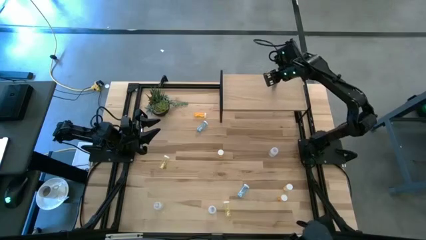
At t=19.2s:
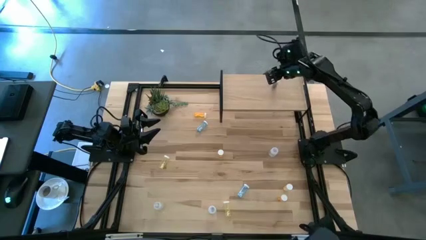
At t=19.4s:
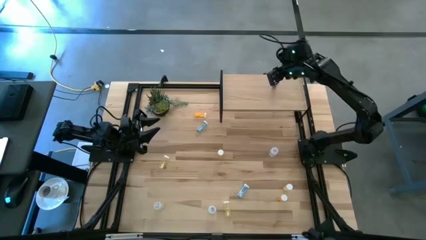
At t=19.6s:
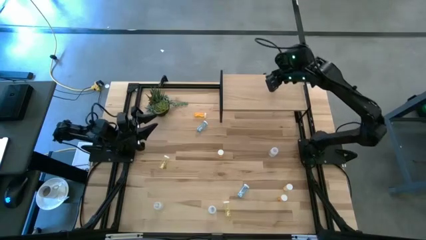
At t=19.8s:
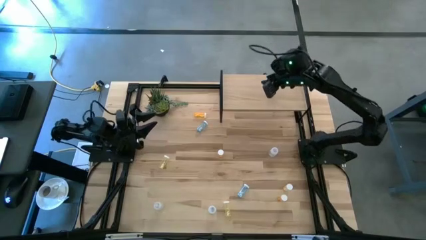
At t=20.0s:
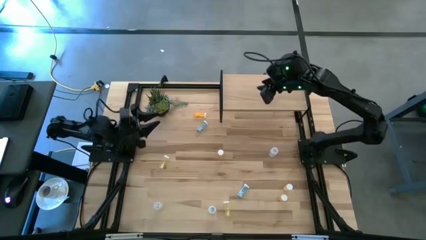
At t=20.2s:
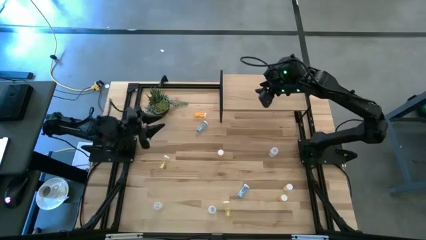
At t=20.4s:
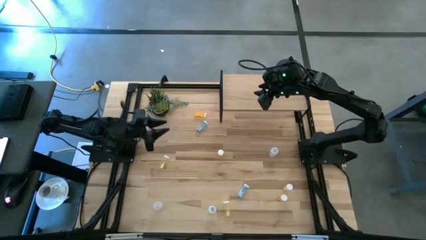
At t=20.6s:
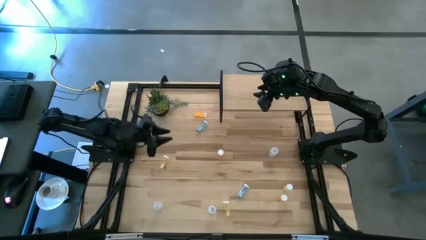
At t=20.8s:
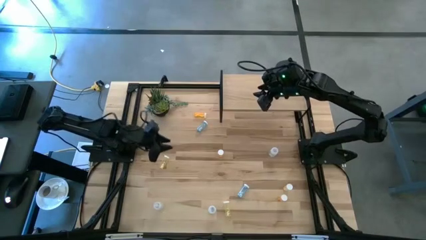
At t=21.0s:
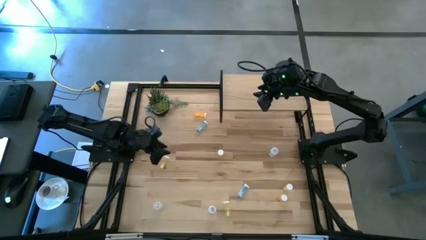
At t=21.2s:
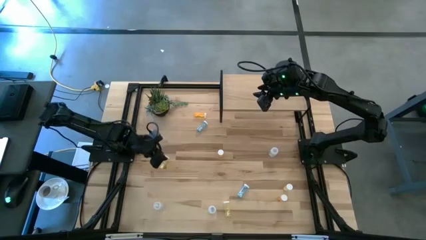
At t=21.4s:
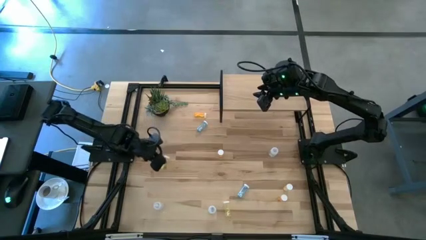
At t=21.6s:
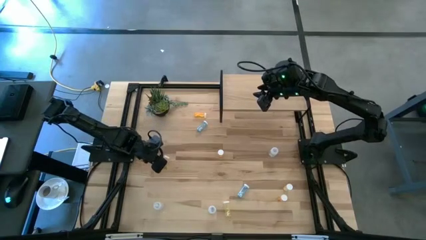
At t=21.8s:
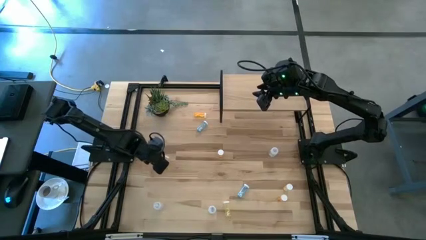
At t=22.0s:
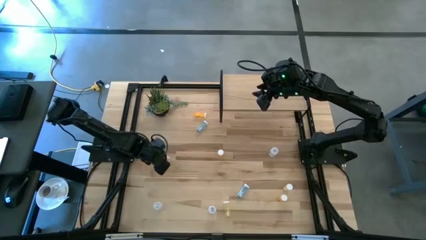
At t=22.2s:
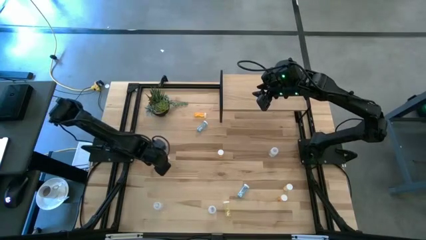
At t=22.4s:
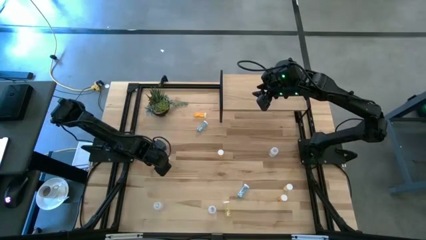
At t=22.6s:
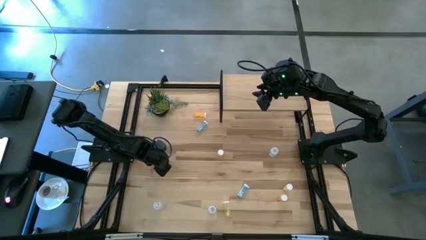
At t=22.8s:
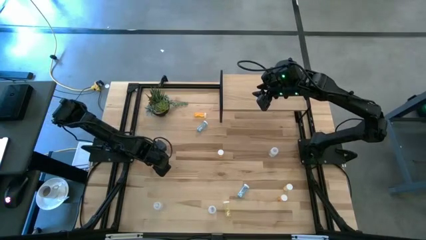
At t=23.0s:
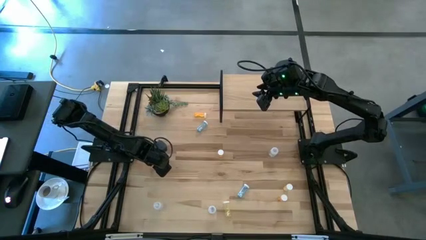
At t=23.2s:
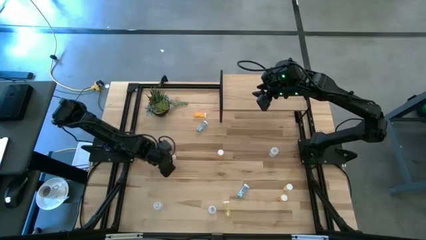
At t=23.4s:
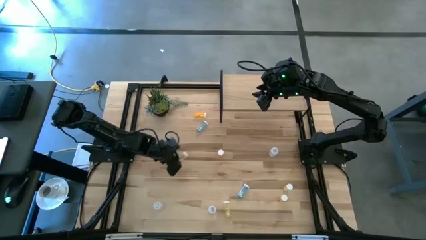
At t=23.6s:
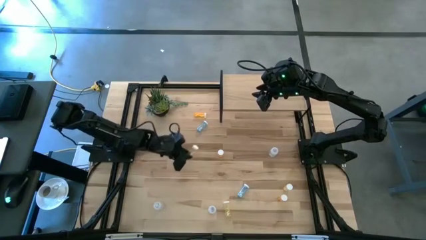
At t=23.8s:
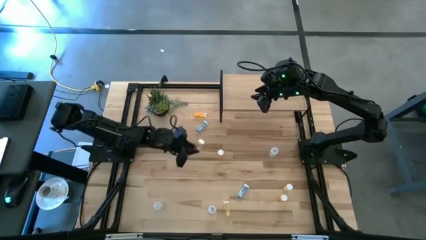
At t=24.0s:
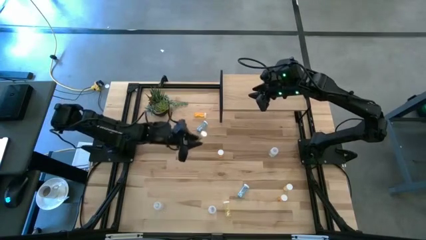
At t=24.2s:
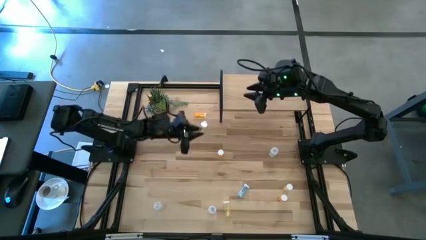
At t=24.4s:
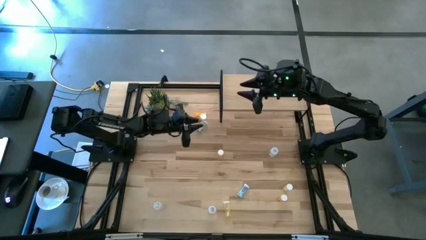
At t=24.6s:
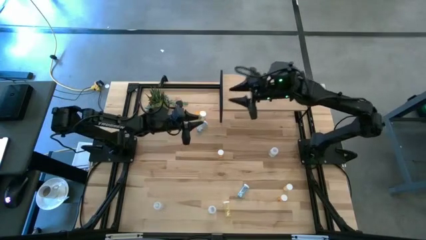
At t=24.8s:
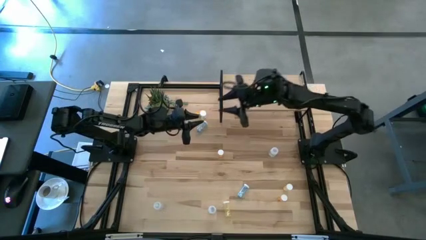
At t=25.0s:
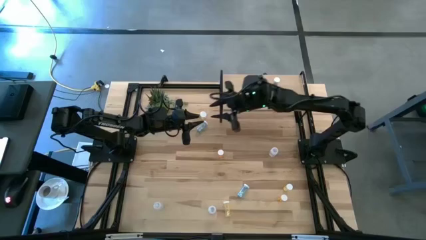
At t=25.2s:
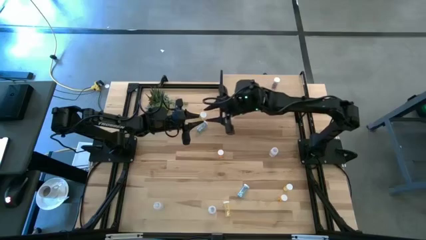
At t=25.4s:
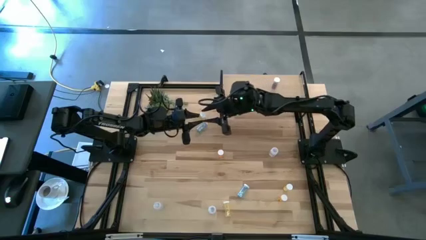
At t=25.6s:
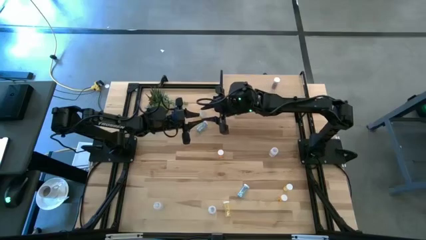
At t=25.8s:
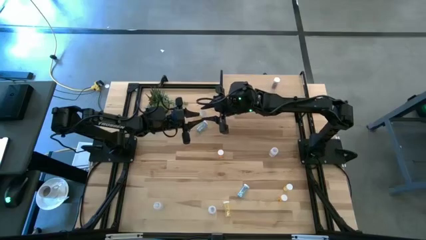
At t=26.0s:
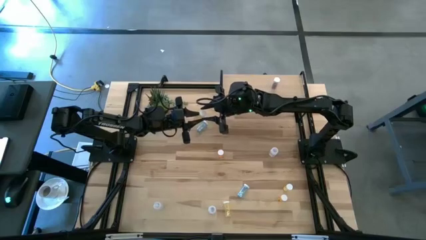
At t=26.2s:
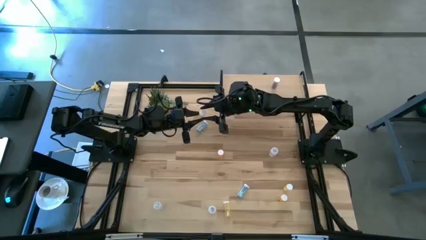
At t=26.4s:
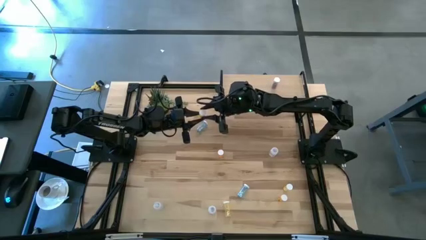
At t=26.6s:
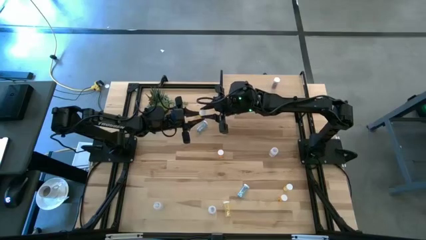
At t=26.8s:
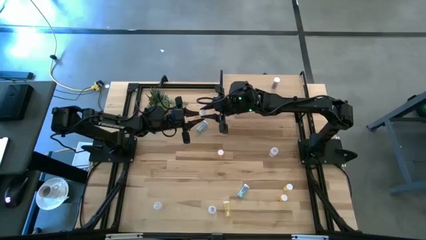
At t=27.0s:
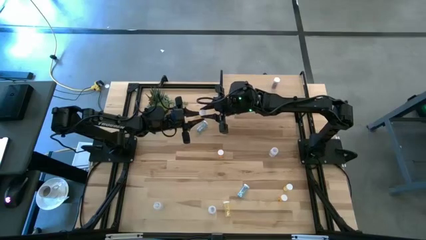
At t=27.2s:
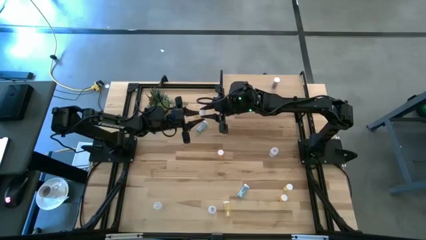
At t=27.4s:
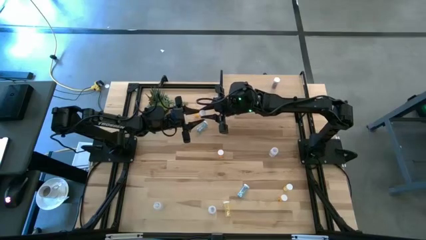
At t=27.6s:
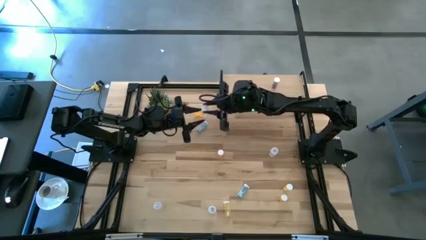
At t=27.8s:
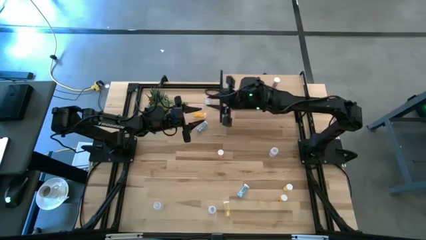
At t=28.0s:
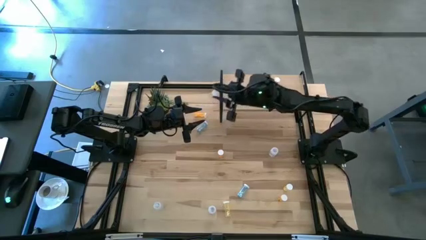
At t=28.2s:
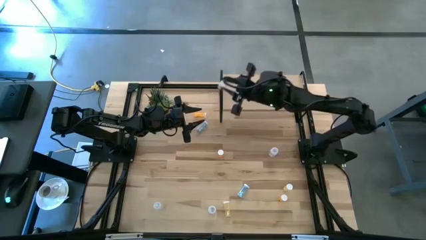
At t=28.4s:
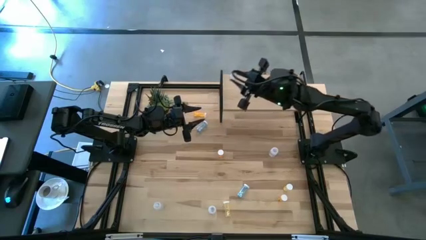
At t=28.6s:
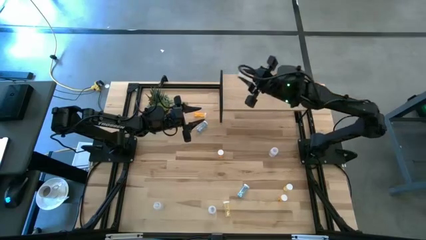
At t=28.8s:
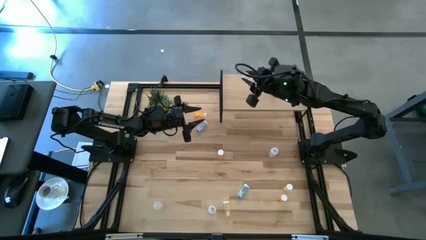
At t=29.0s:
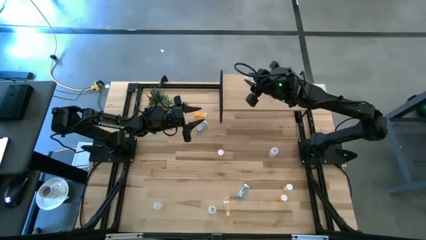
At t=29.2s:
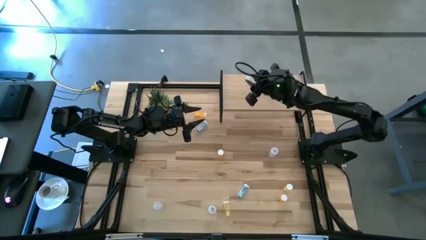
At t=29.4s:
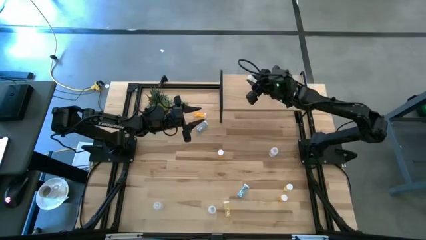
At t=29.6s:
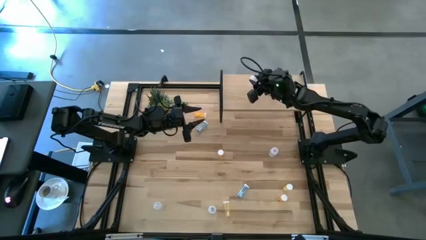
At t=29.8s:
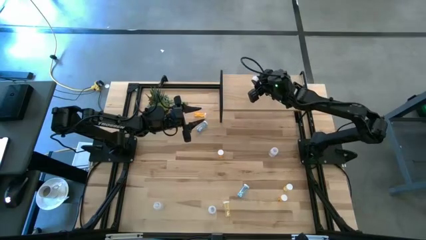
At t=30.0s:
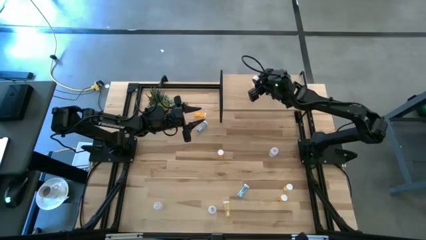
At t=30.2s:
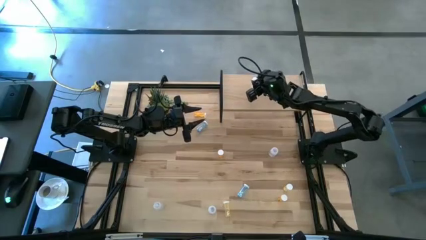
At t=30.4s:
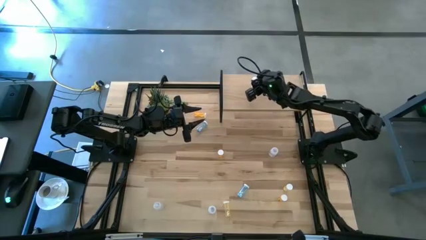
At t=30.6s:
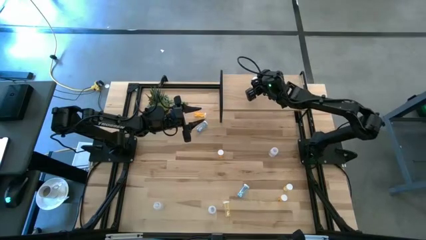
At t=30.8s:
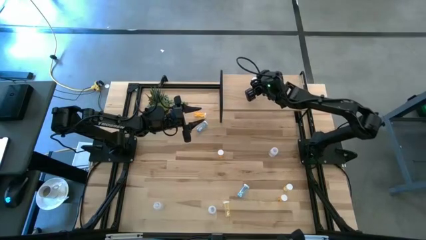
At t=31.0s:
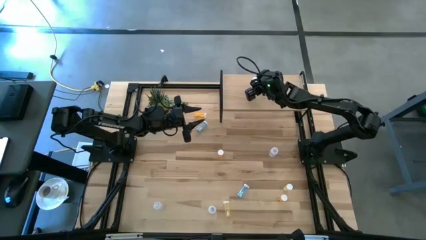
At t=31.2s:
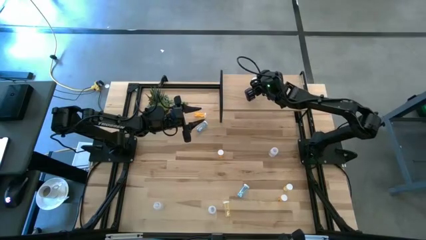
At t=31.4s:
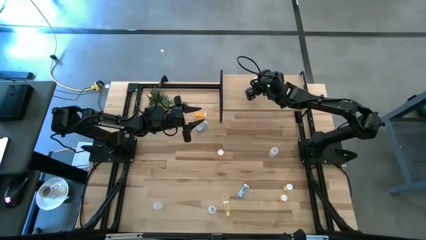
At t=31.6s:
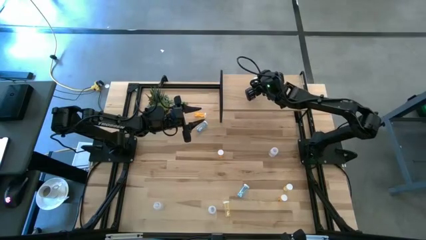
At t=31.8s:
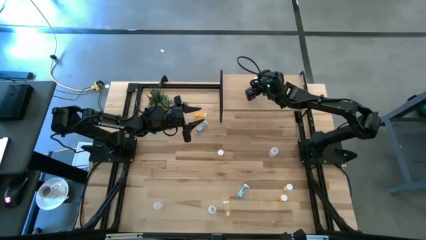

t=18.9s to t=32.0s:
Task: Pick and place medicine bottles onto shelf by color
Put the left yellow pill bottle on the shelf

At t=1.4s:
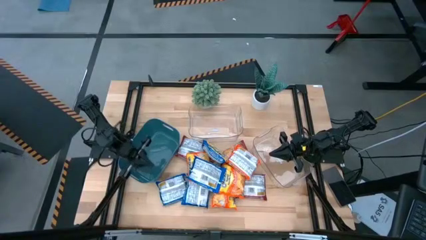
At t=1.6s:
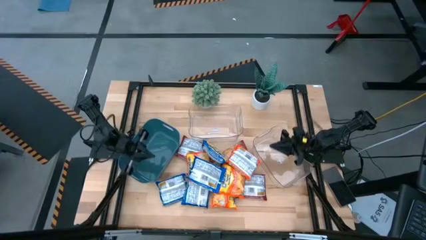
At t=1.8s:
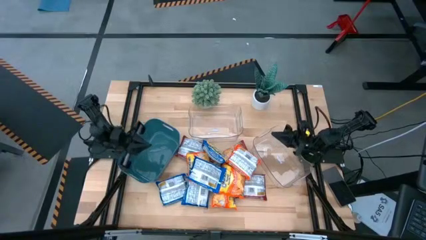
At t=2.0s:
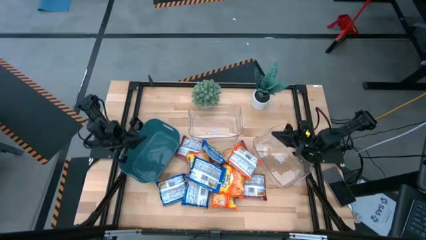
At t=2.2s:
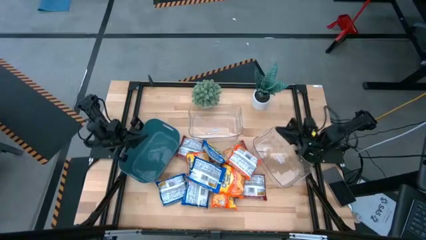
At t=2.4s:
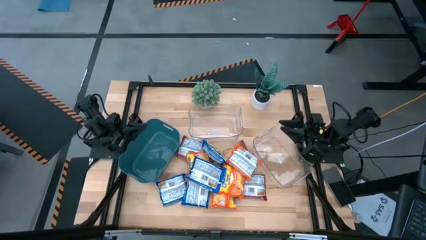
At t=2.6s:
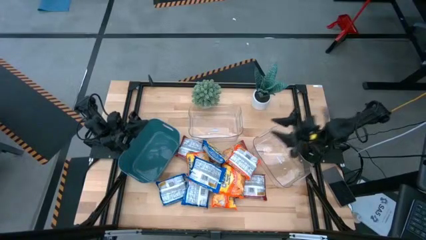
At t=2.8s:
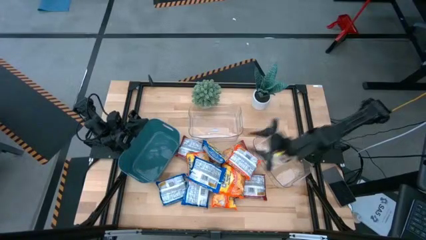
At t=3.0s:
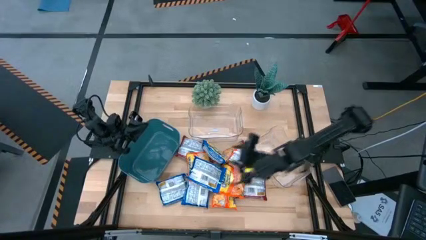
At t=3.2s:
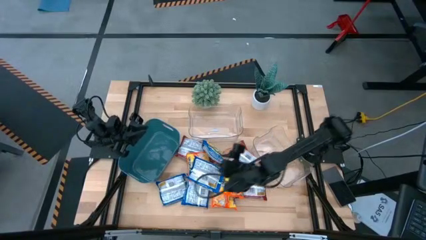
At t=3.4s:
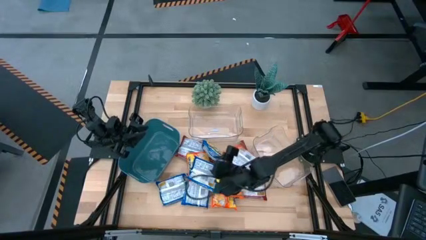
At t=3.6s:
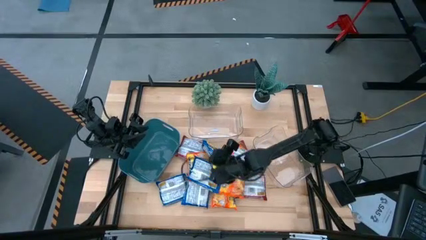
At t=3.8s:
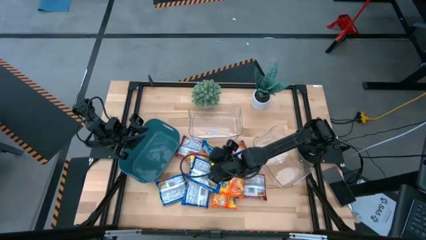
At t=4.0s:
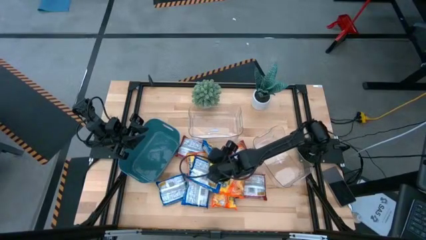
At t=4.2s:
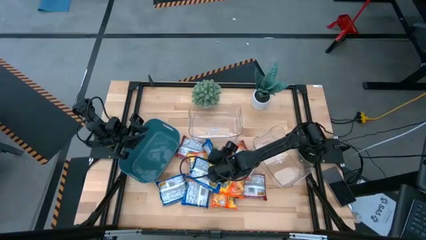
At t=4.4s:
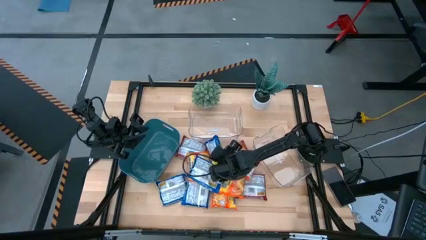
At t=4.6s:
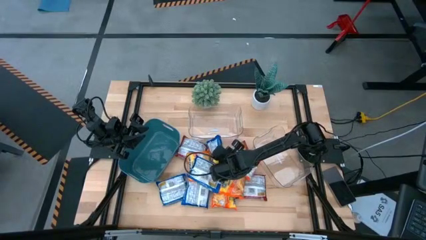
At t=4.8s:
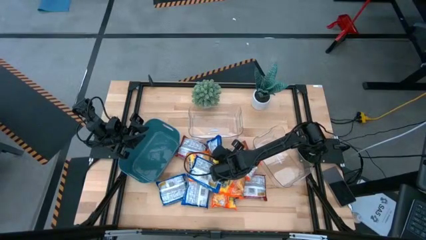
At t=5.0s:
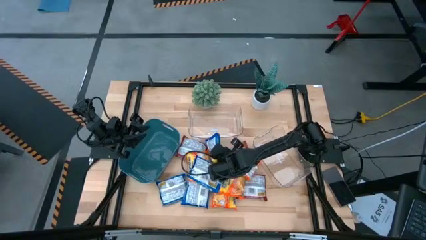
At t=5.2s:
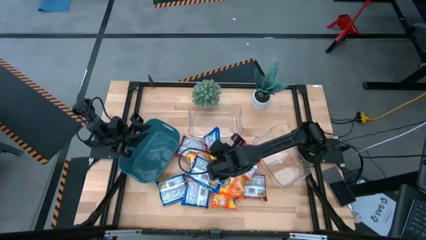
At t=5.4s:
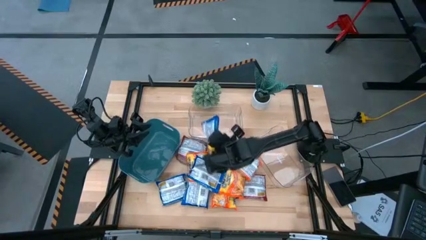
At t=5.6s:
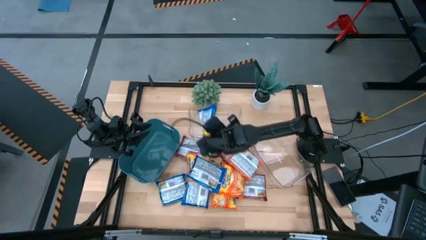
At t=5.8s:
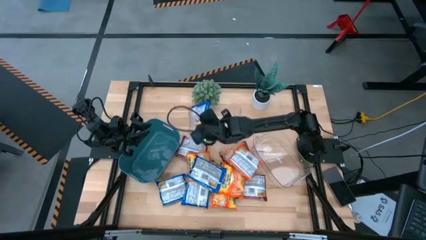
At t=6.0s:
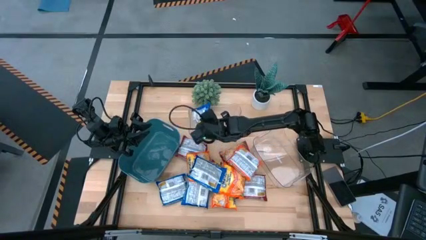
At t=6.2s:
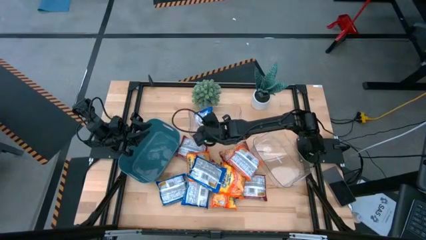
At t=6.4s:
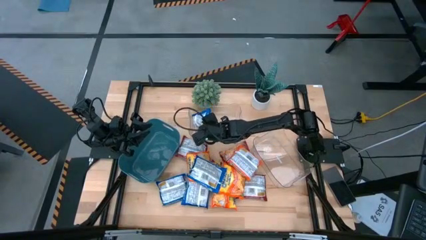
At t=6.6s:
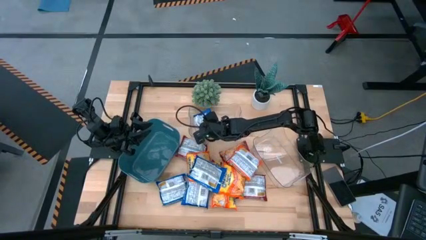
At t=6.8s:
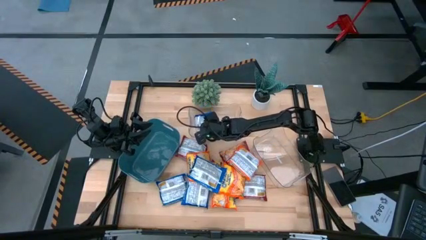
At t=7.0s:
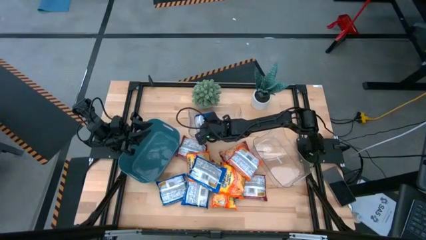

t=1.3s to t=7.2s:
Task: Sort Maruchan noodles
Put the blue noodle pack into the left transparent bin
